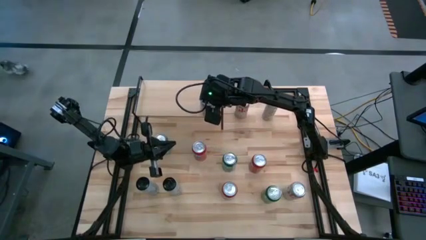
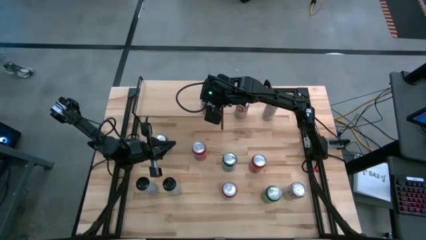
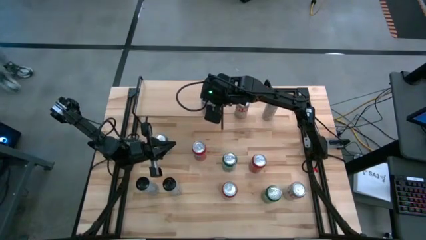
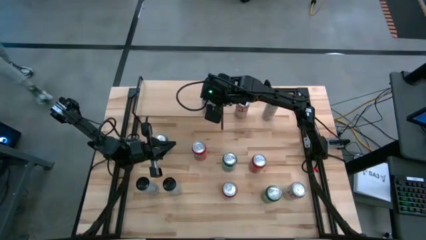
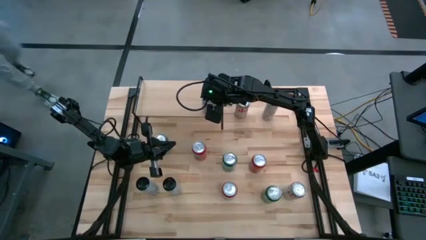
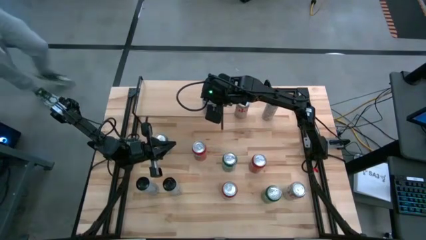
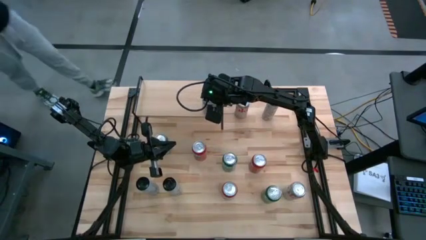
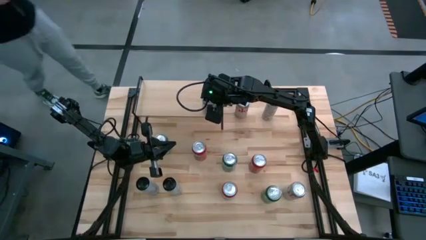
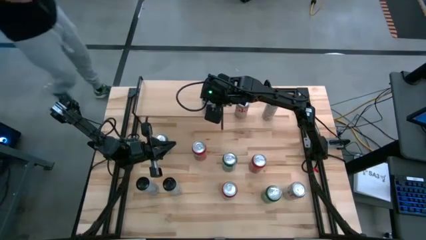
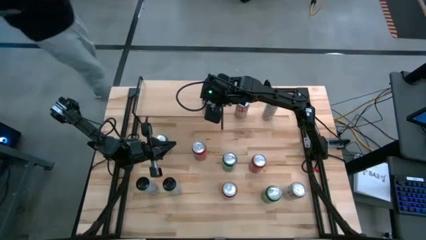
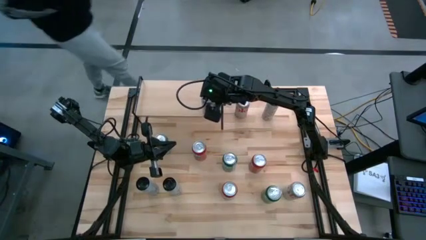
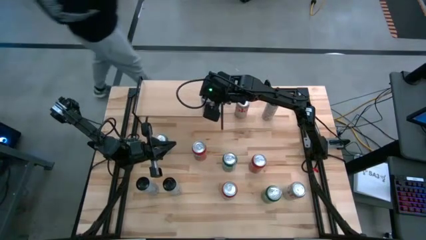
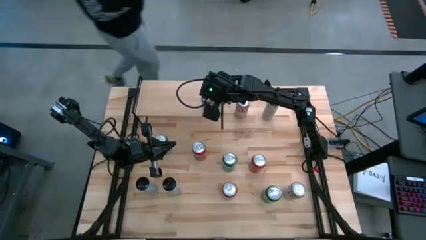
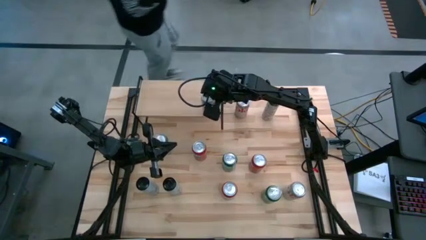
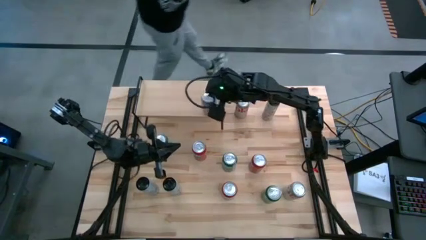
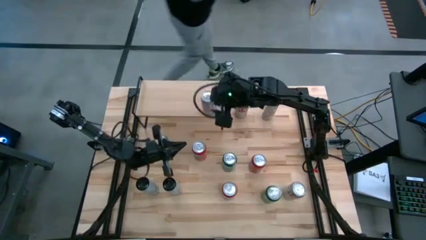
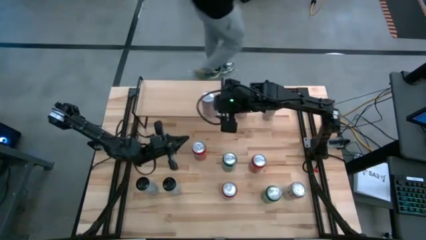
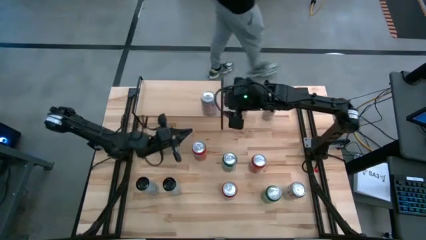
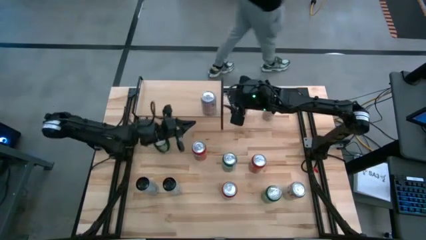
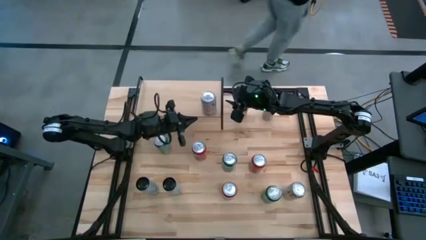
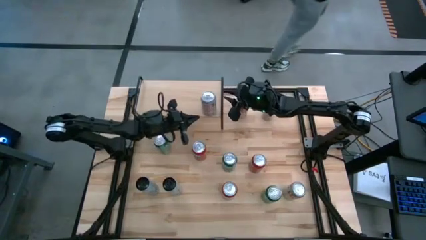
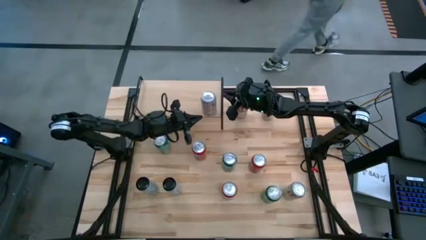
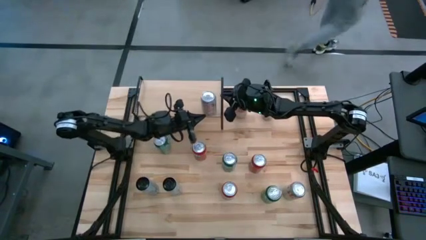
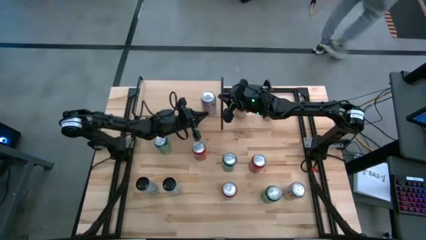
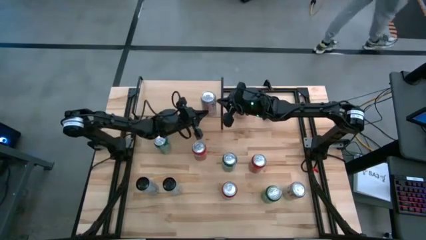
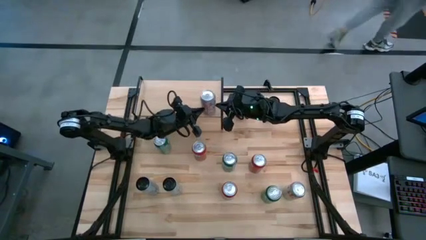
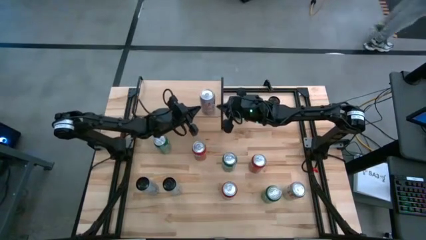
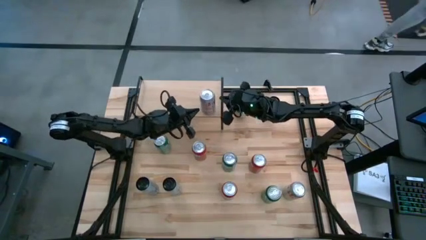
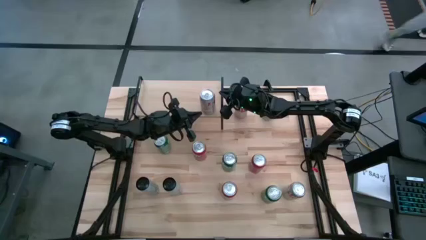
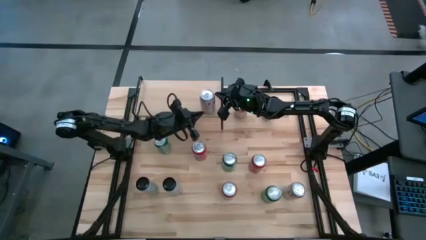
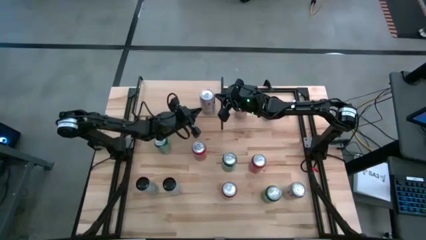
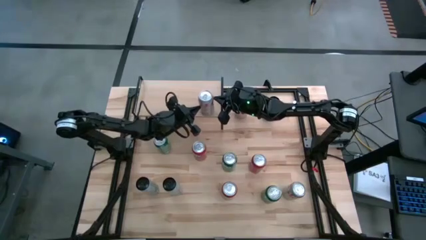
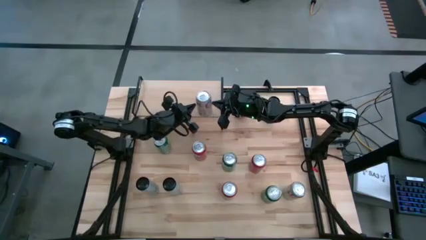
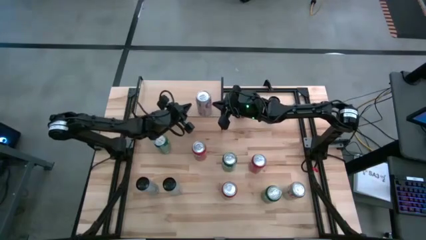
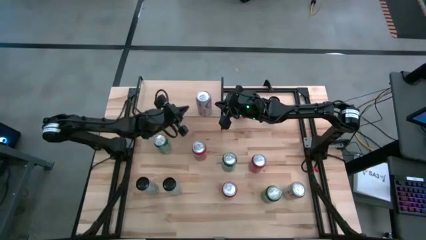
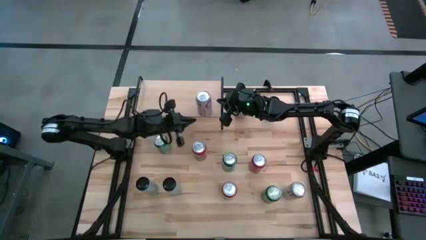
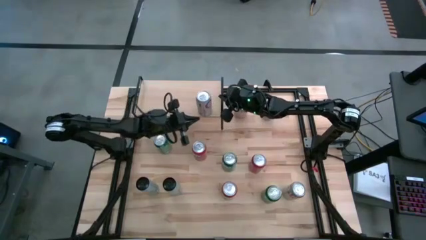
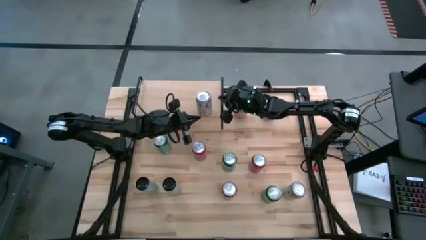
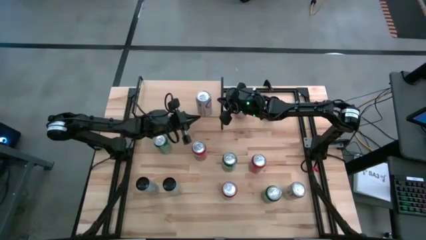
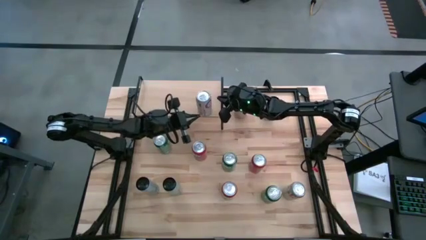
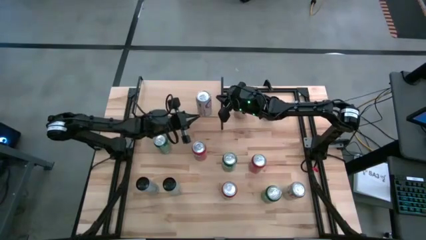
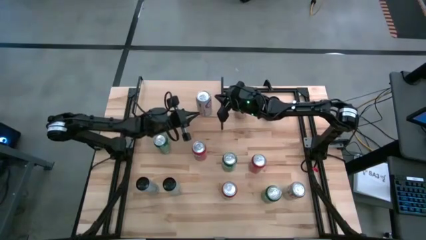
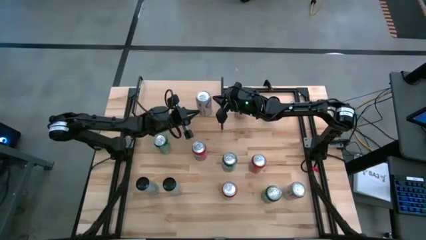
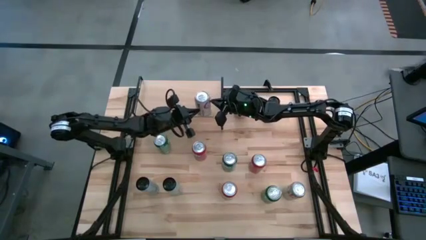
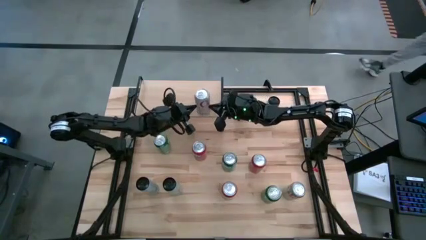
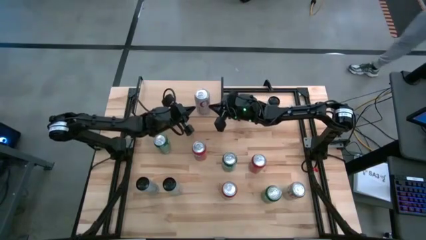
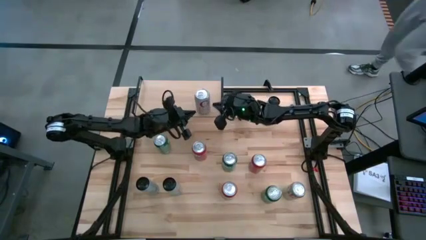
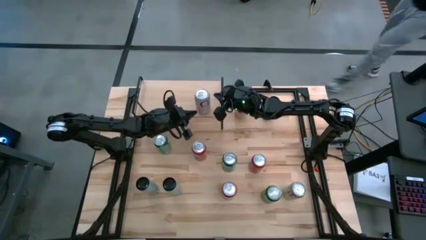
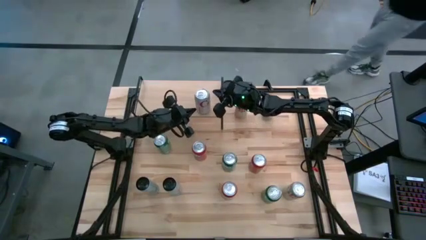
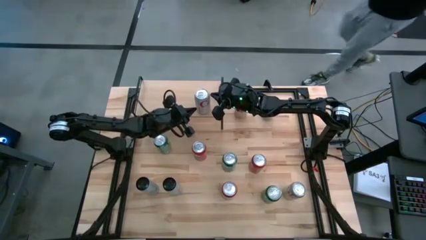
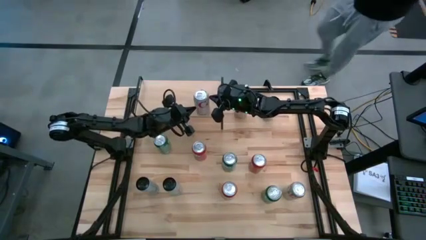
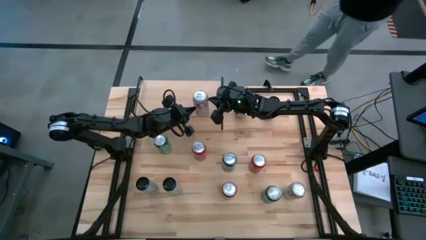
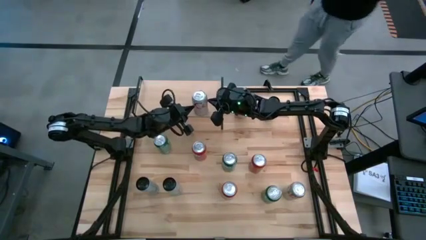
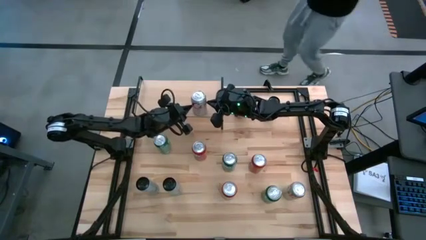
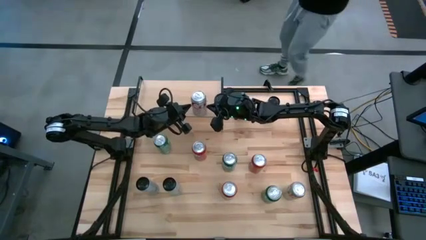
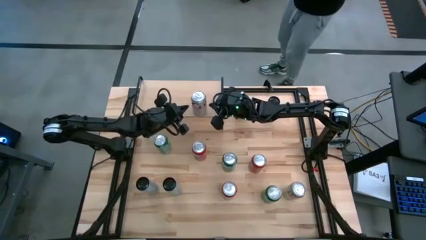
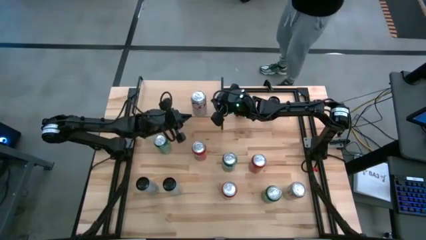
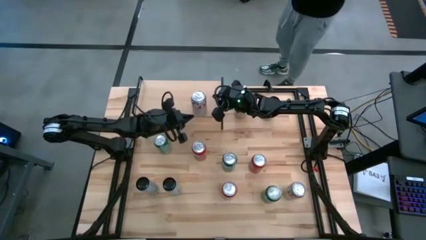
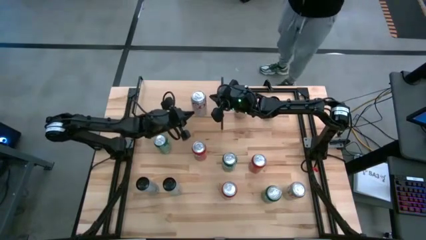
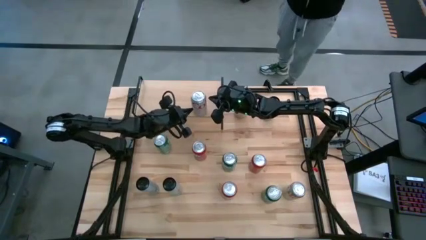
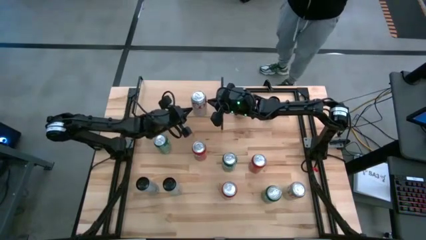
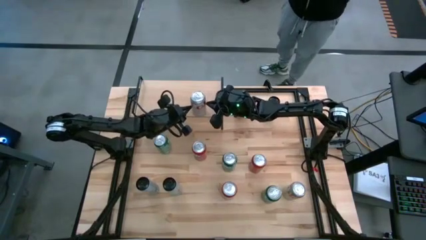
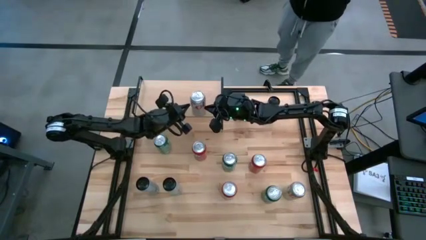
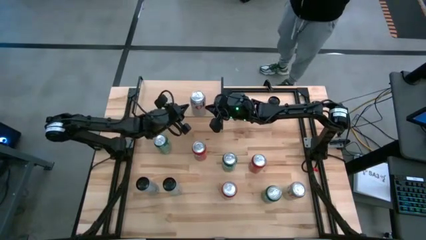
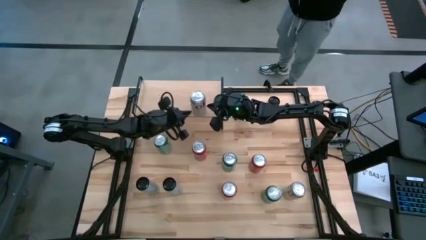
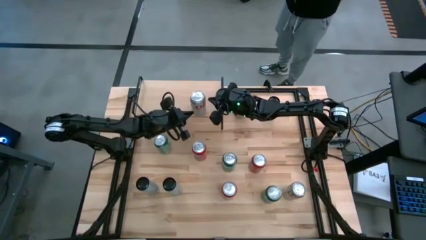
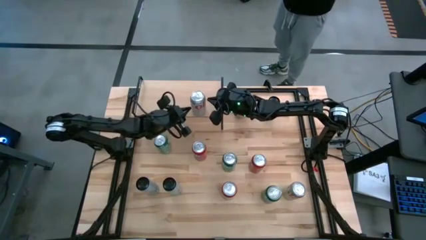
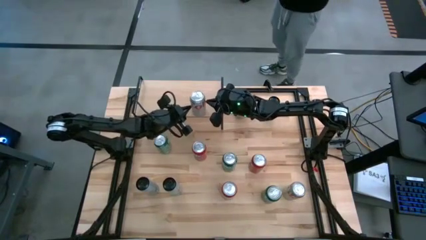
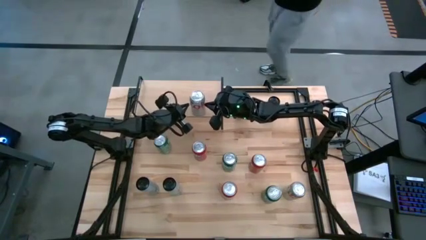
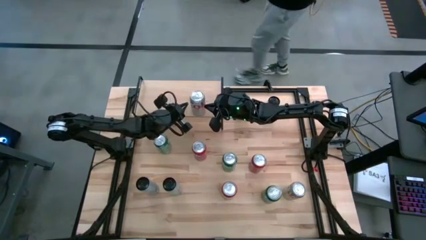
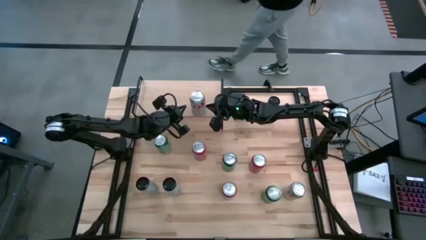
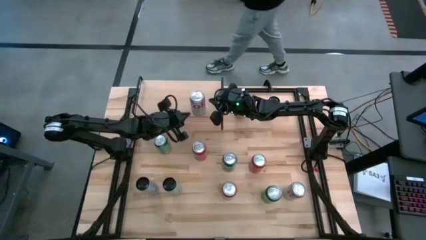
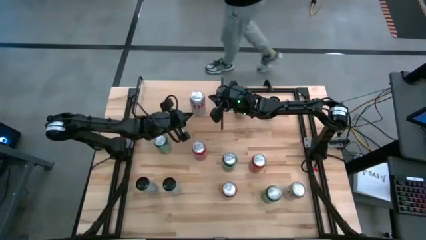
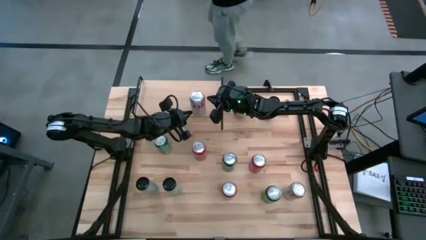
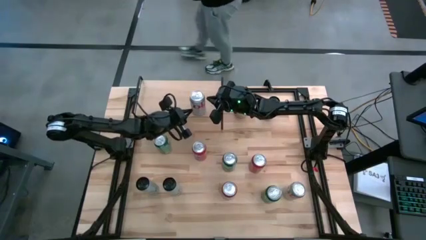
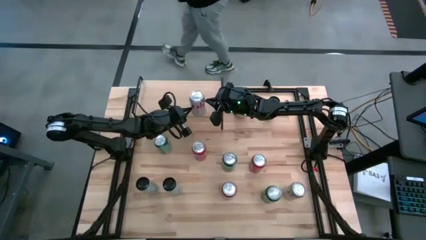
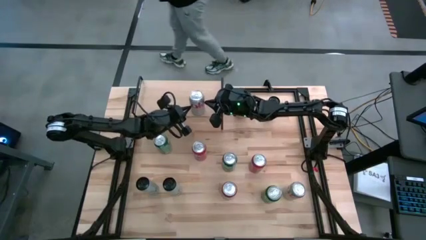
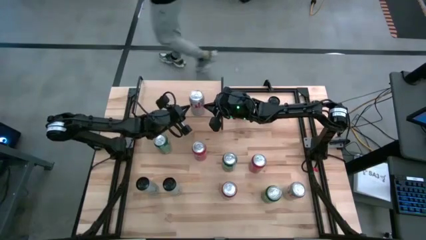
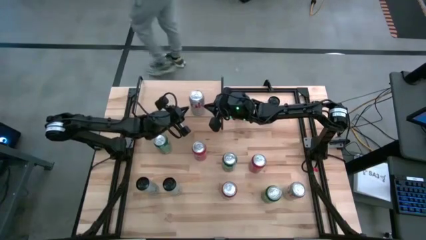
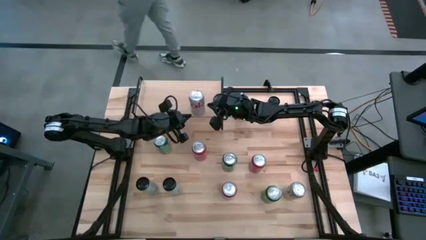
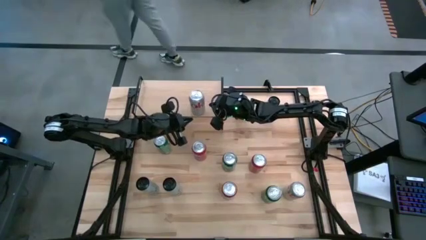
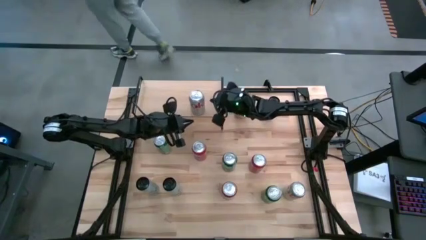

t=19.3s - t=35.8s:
Task: Place canned beverage on shelf
Put the middle silver soda can on the shelf
